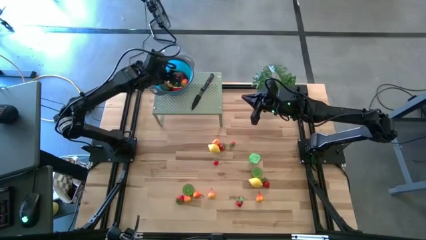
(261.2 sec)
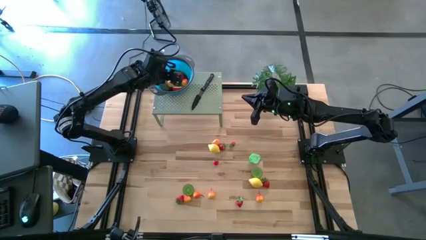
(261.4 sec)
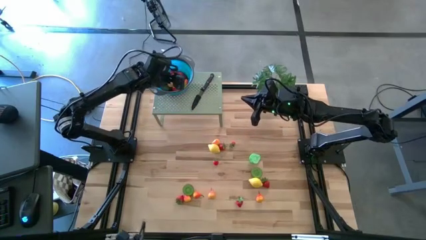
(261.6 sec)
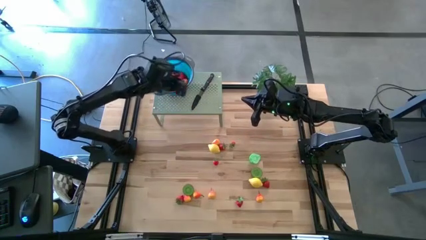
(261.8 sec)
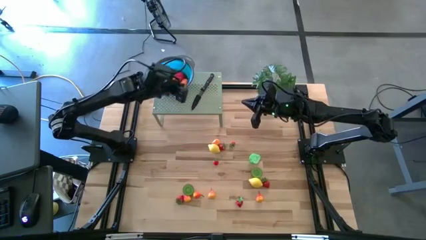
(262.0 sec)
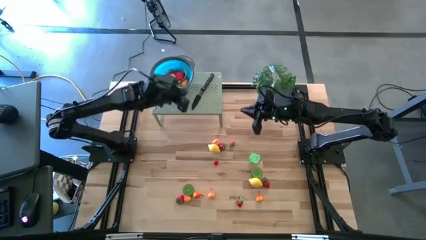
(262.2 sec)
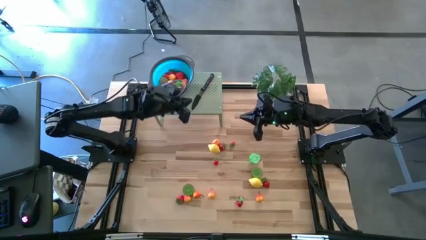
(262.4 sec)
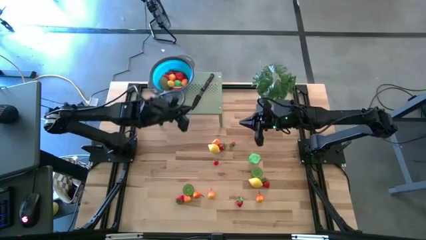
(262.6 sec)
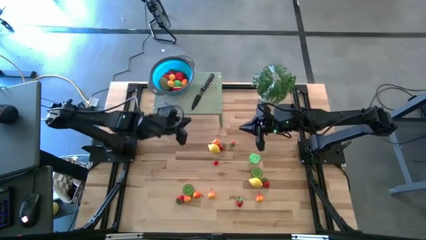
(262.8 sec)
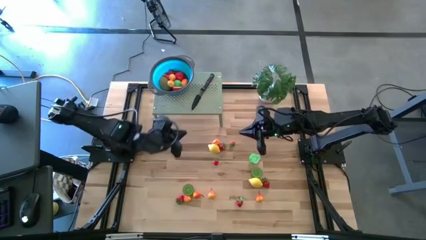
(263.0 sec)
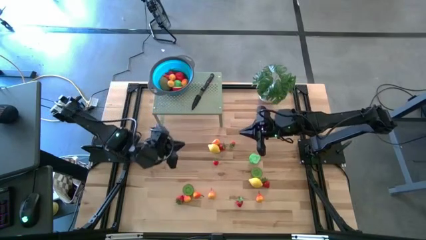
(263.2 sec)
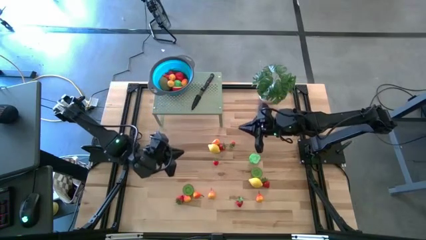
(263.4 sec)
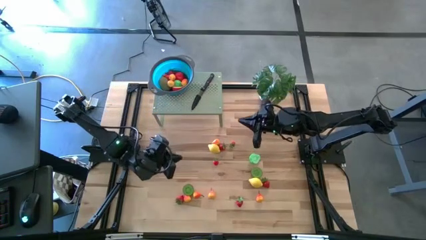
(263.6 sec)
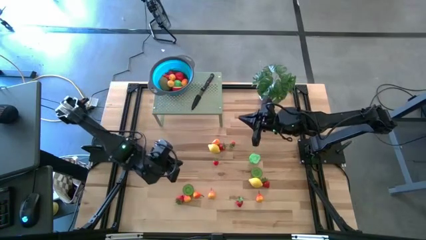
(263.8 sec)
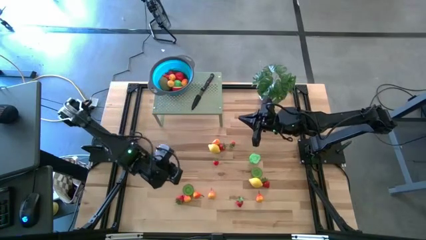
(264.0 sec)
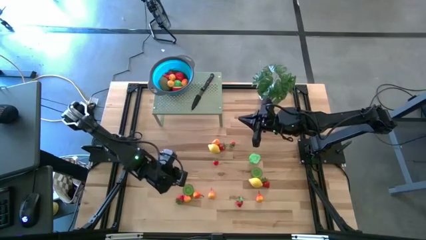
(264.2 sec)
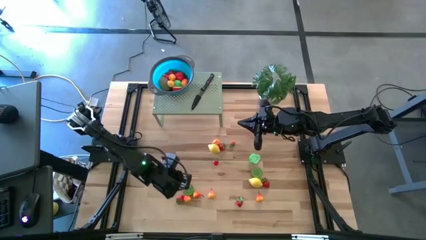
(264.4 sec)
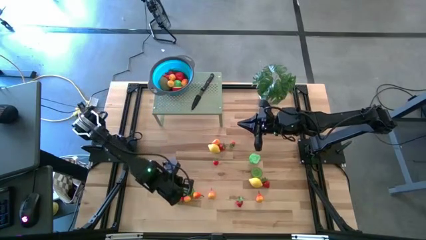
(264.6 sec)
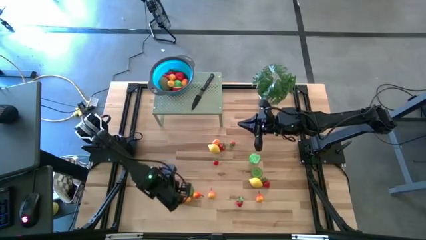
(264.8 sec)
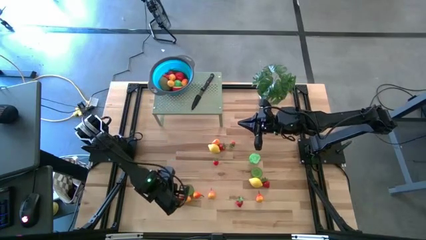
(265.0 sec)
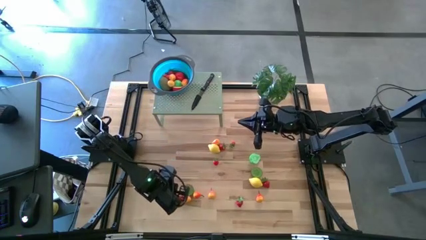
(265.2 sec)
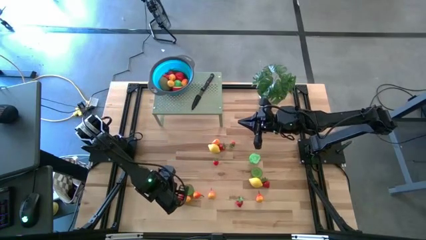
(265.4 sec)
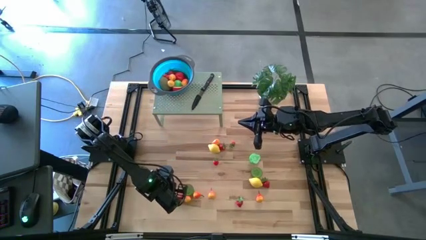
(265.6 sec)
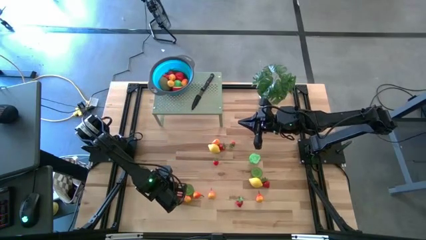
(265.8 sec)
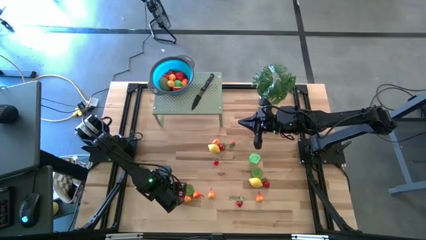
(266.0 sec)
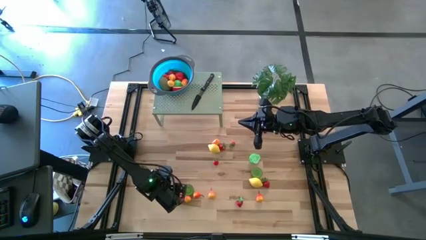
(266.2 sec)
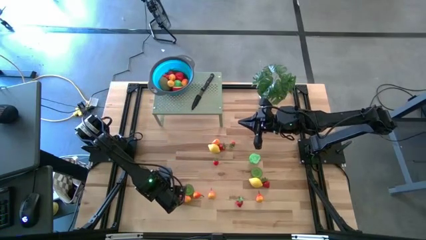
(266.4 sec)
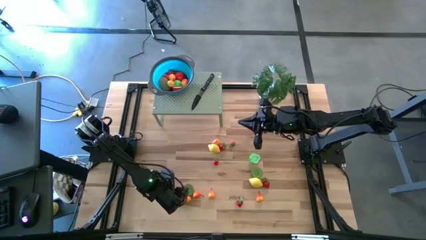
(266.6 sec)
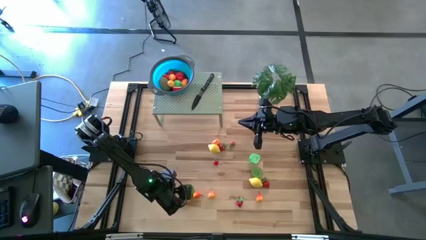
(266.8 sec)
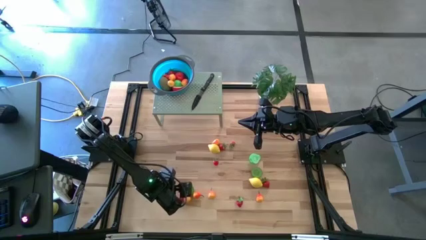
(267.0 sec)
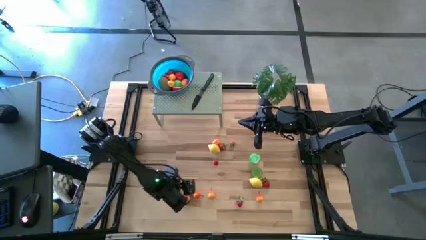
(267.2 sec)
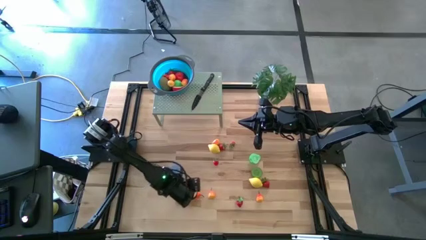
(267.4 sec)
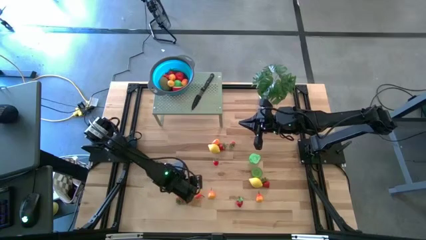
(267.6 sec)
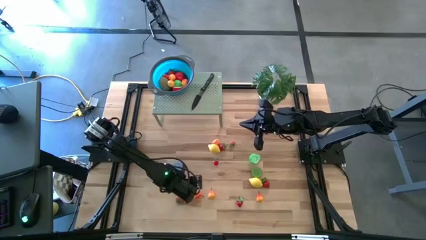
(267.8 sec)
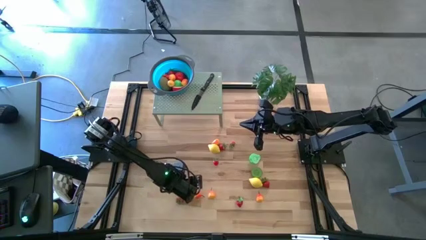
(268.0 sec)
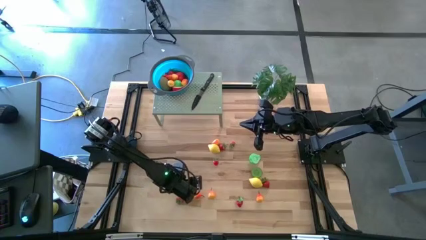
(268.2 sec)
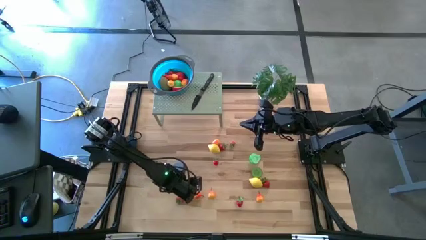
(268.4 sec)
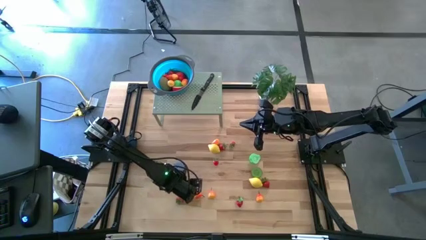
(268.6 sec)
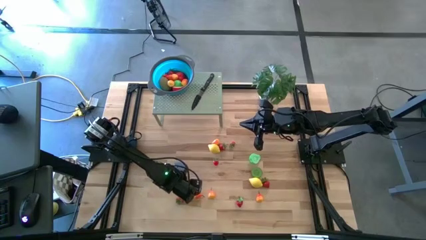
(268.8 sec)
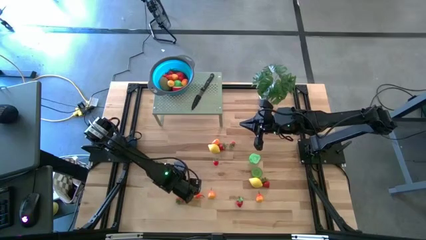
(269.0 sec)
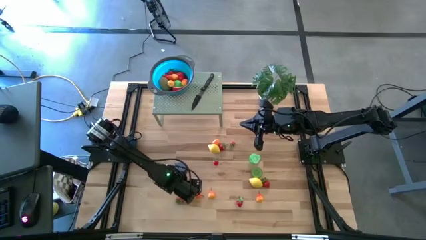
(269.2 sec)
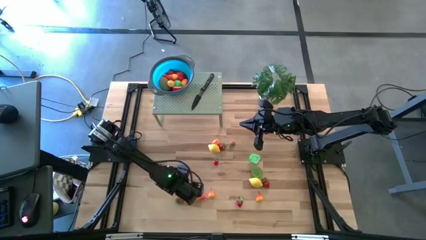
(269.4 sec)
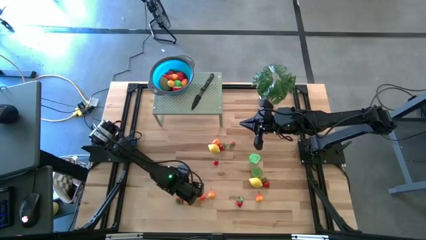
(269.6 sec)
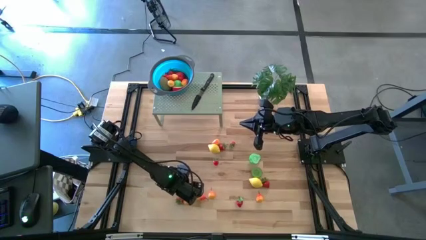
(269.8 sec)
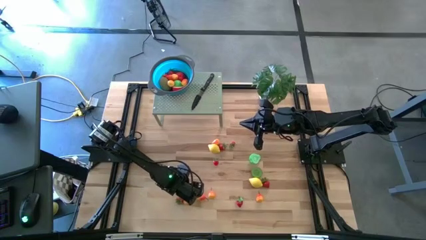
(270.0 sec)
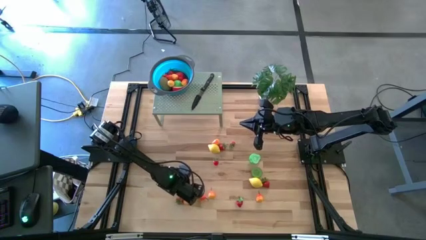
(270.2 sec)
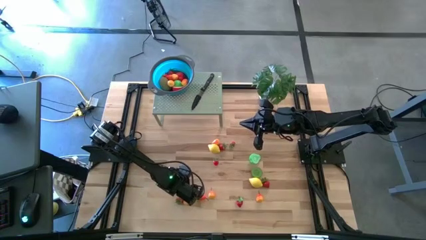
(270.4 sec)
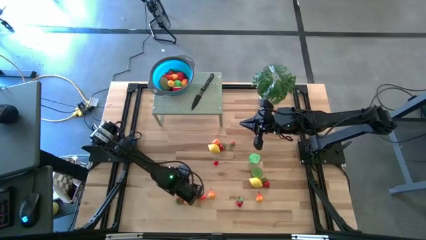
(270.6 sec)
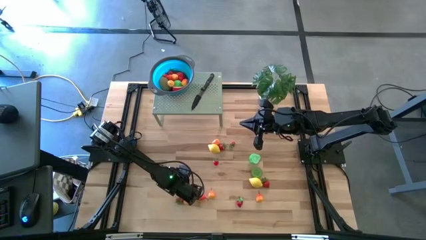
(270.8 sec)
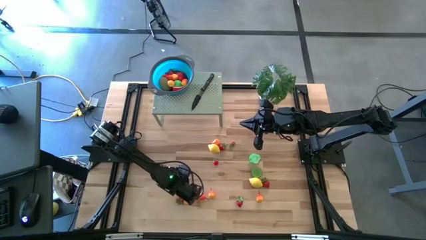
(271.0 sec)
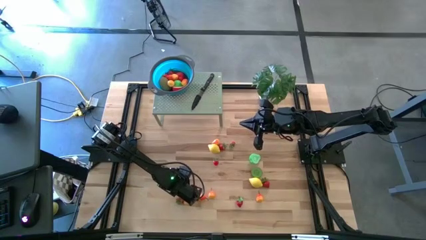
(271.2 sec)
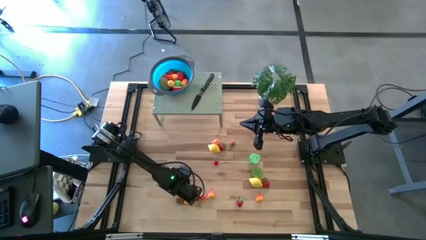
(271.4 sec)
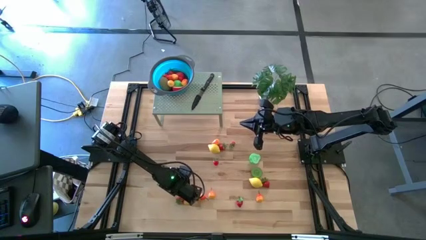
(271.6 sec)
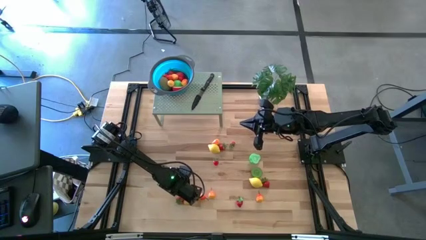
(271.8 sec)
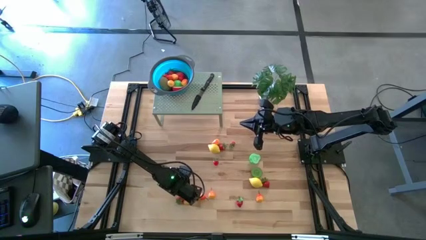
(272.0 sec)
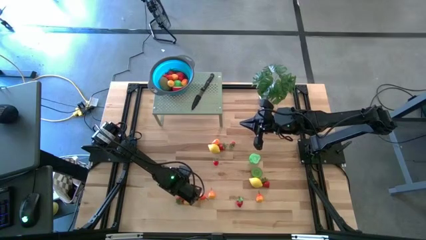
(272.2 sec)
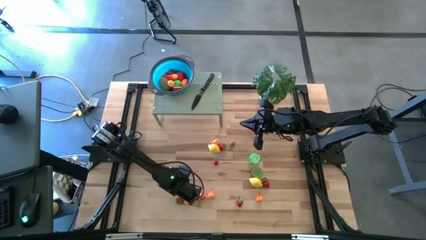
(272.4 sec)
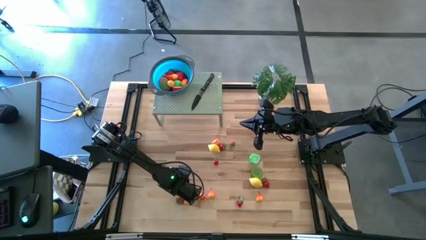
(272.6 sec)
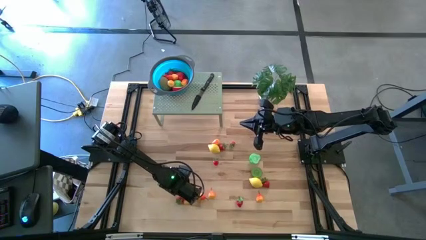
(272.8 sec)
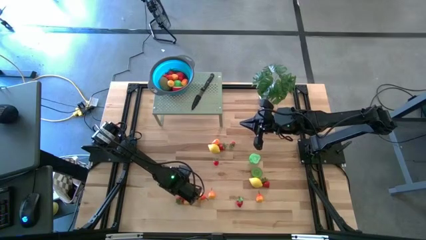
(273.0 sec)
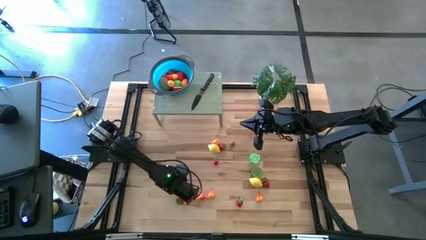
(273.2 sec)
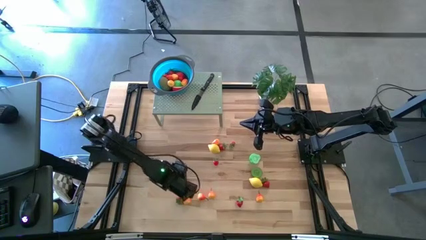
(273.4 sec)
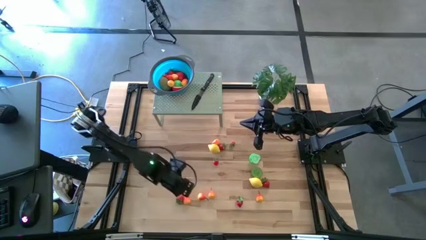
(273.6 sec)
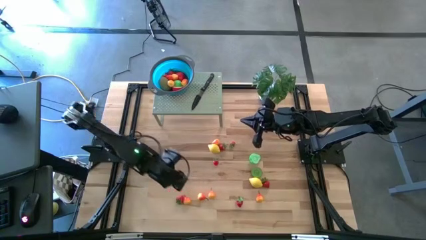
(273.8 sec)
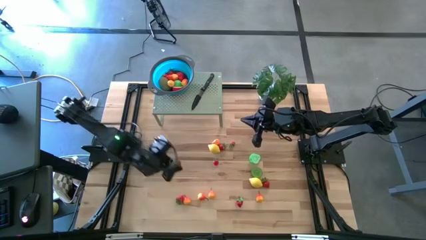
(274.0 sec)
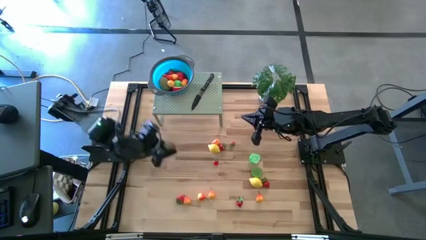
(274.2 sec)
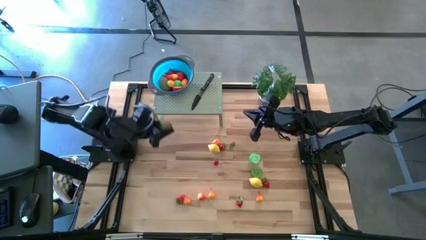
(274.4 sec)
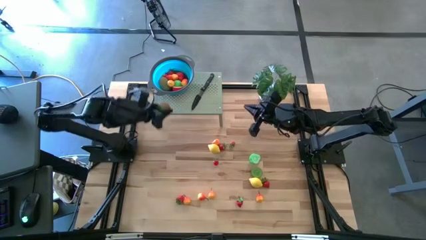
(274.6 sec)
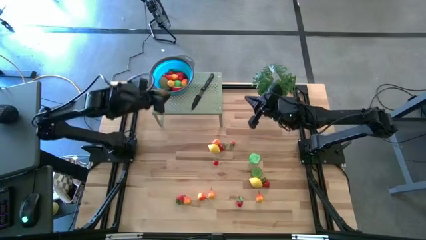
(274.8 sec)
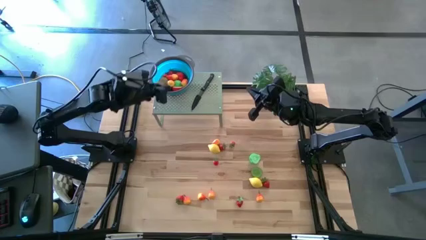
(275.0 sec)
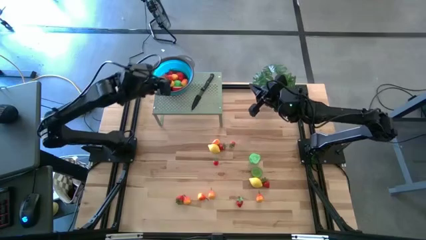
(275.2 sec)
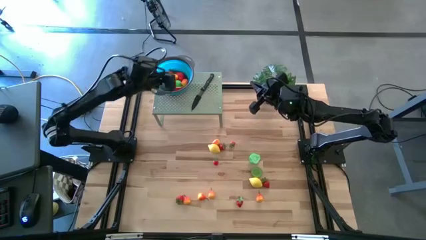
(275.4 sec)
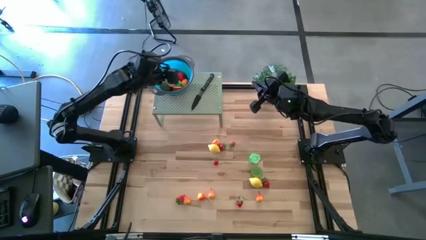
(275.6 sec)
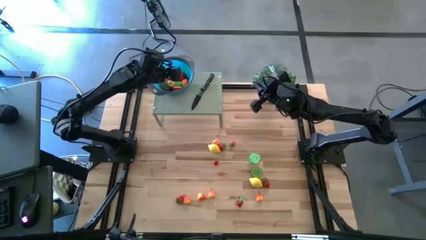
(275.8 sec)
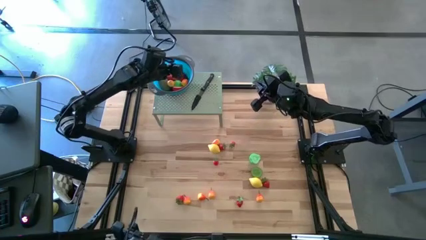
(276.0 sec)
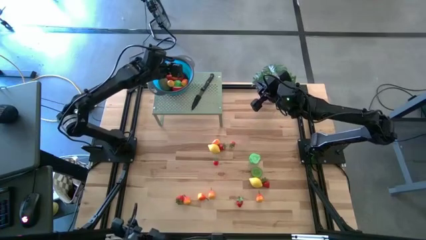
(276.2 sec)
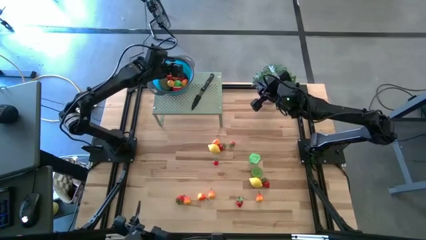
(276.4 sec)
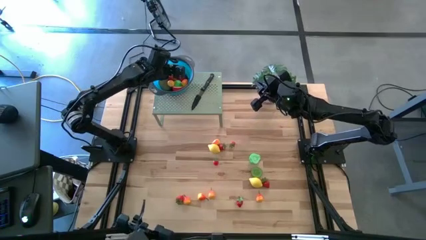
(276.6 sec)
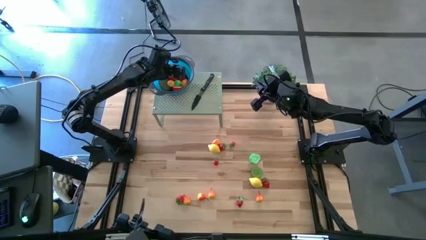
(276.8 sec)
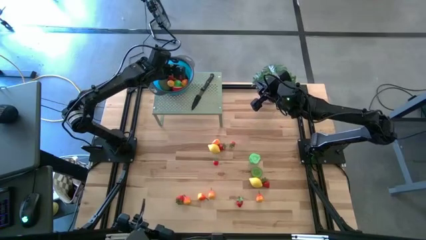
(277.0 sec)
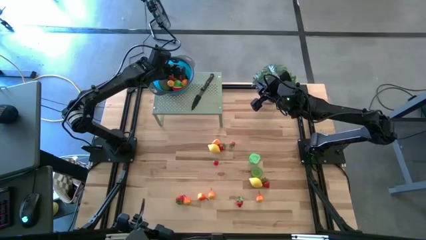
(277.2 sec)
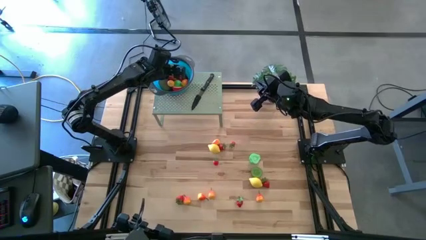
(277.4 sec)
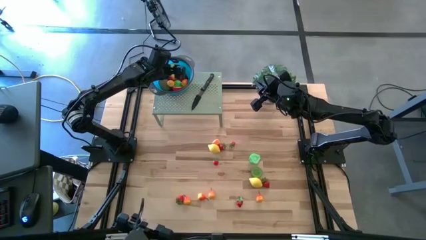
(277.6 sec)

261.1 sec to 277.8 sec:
Task: Pick & Place Fruit
Put the half kiwi into the strainer bowl on the shelf
